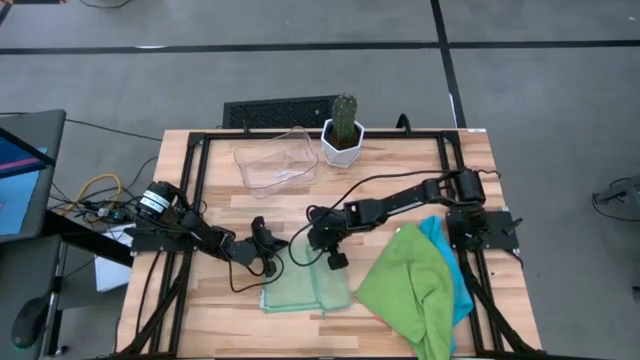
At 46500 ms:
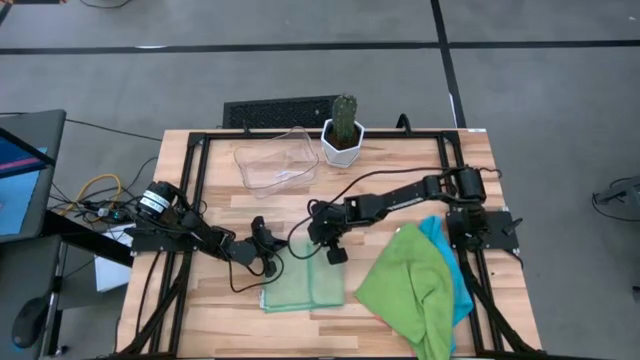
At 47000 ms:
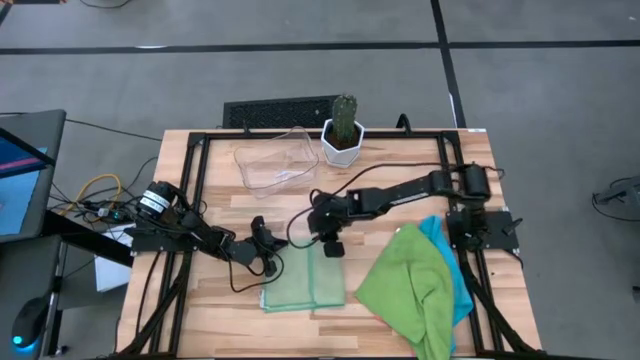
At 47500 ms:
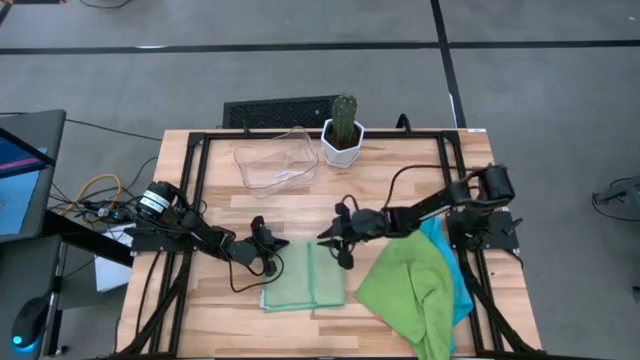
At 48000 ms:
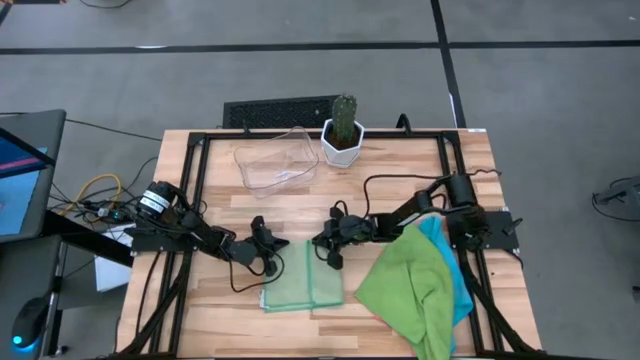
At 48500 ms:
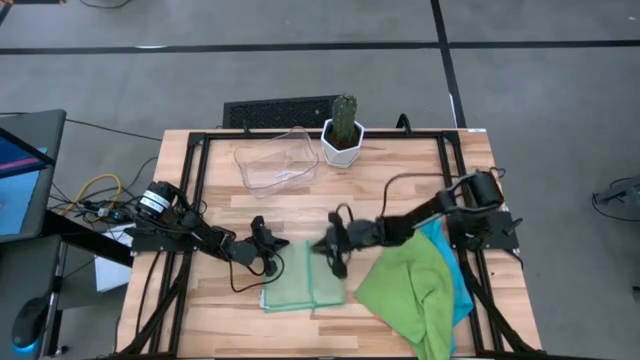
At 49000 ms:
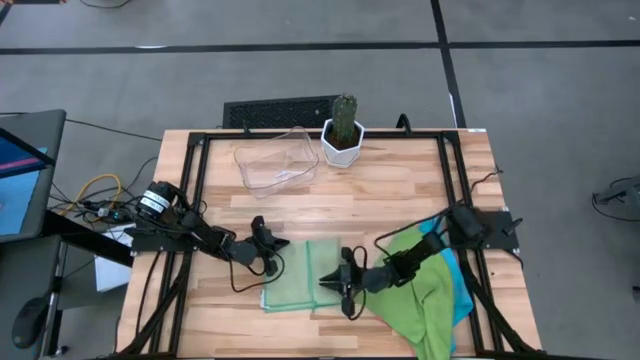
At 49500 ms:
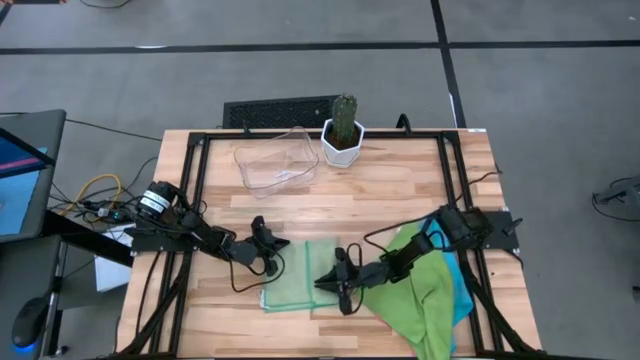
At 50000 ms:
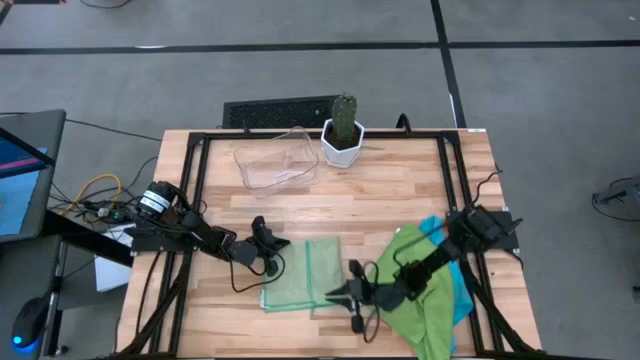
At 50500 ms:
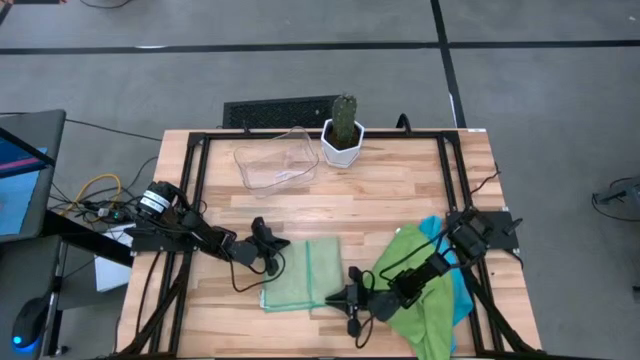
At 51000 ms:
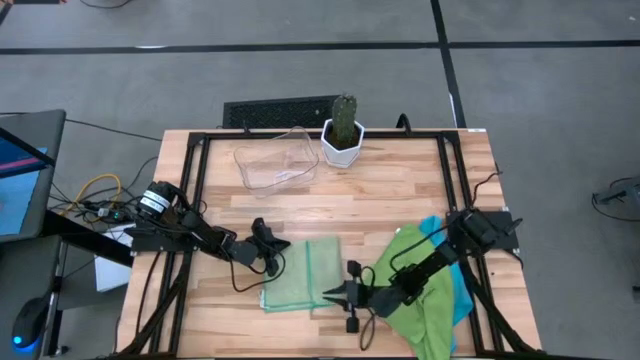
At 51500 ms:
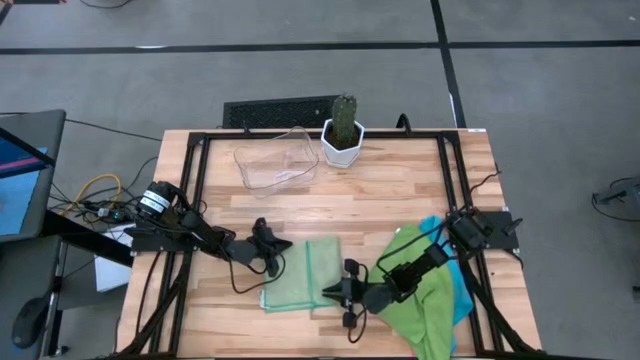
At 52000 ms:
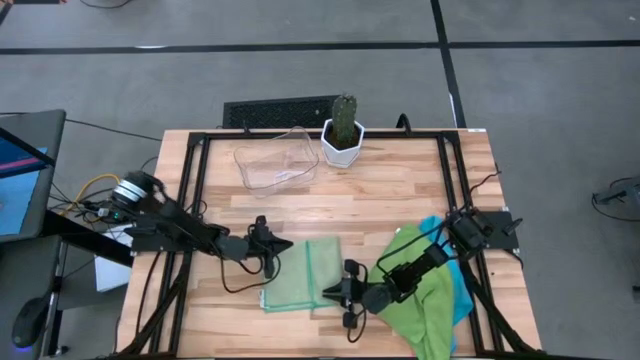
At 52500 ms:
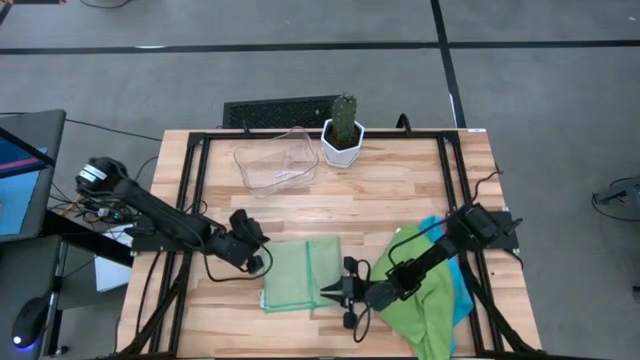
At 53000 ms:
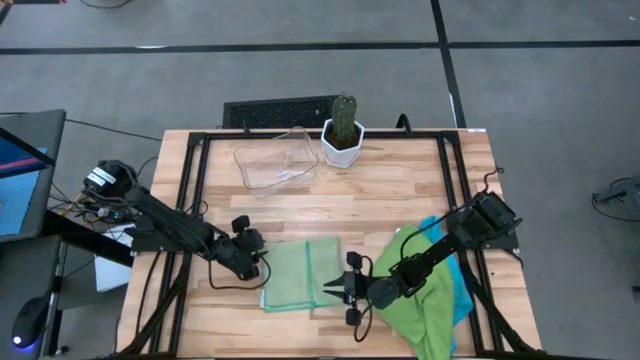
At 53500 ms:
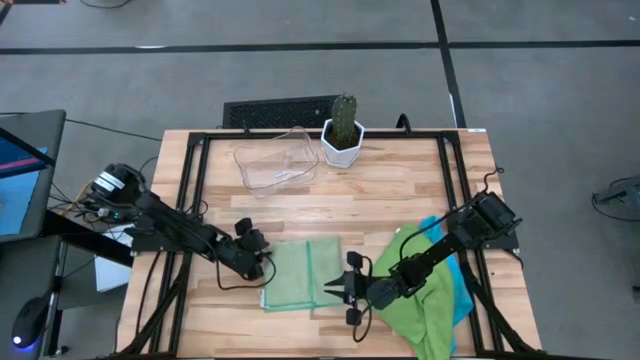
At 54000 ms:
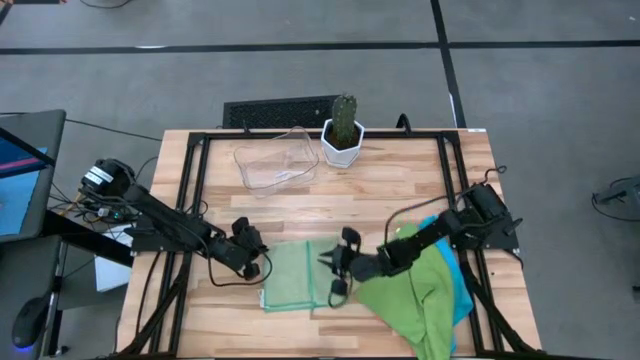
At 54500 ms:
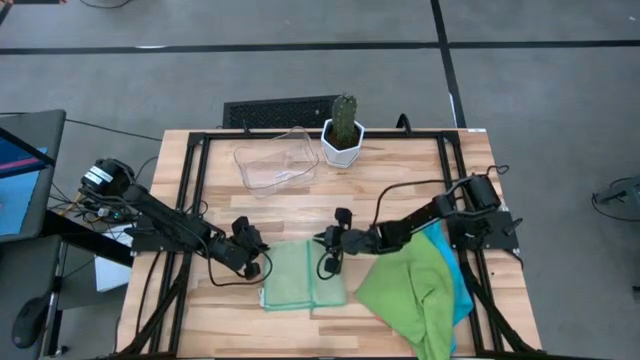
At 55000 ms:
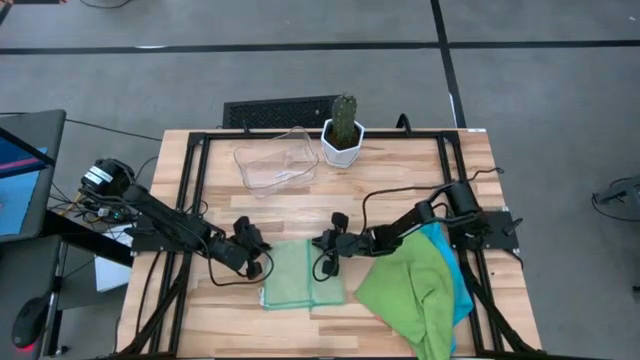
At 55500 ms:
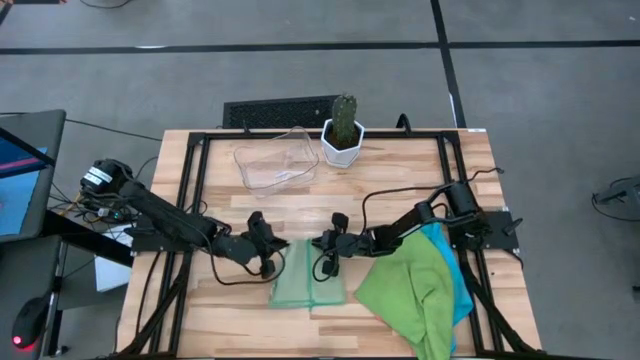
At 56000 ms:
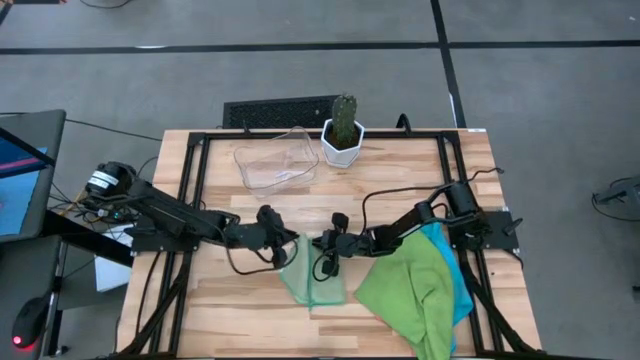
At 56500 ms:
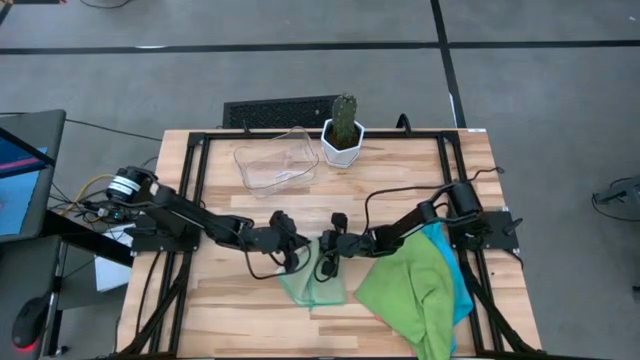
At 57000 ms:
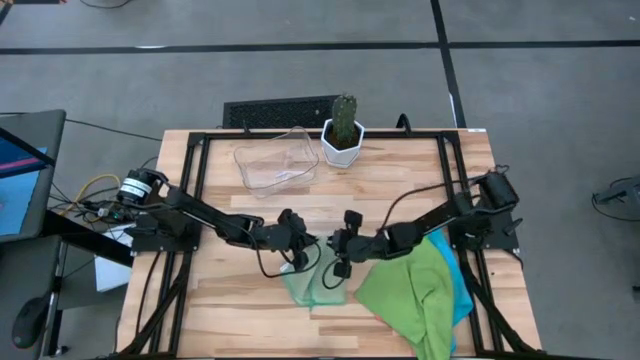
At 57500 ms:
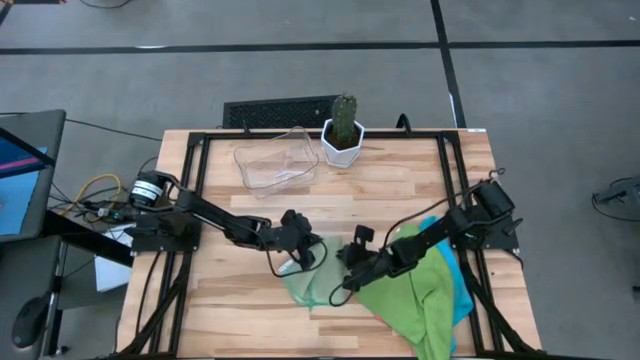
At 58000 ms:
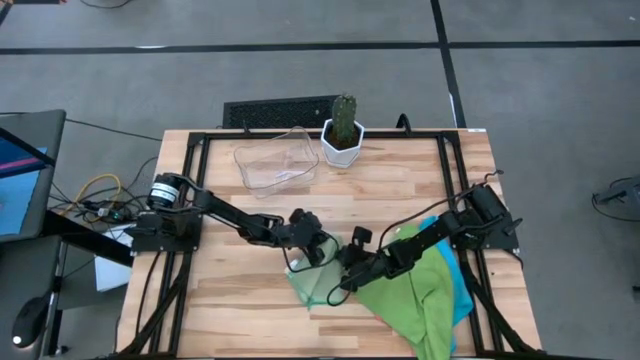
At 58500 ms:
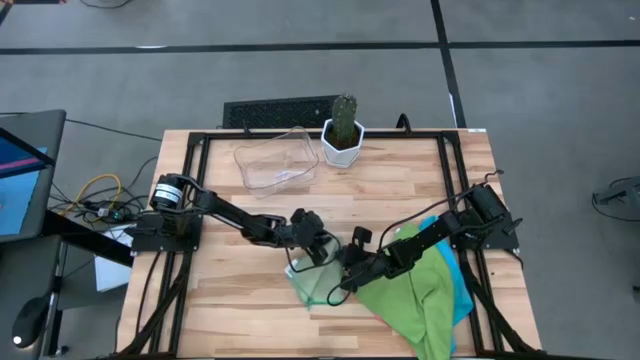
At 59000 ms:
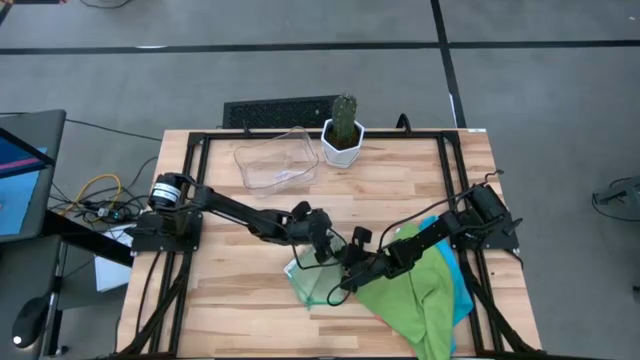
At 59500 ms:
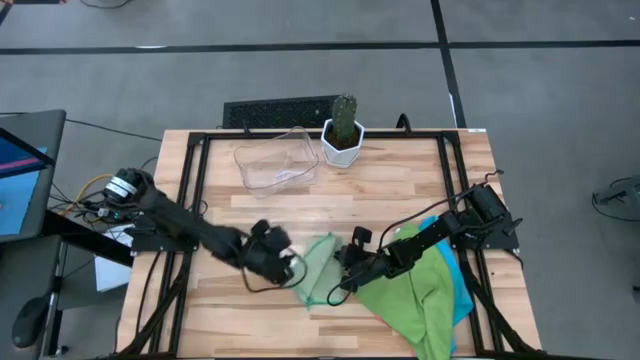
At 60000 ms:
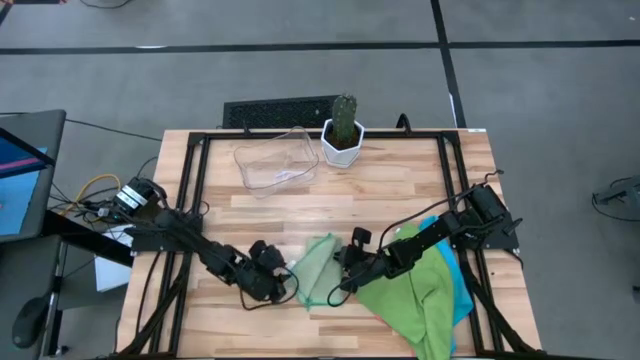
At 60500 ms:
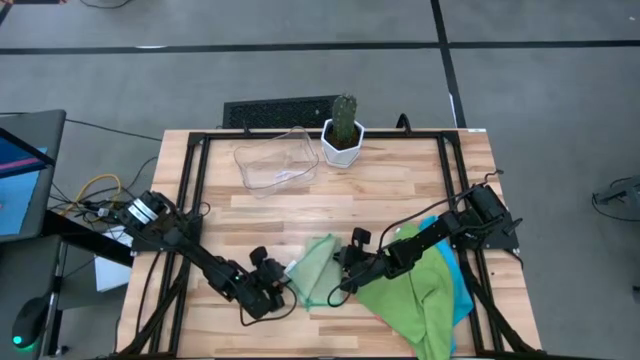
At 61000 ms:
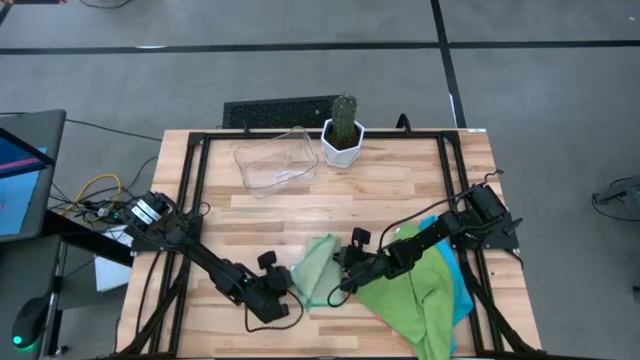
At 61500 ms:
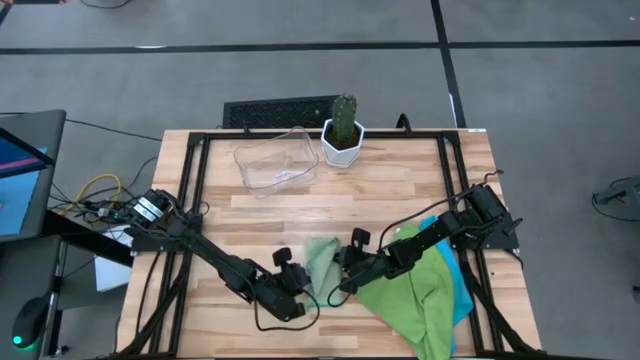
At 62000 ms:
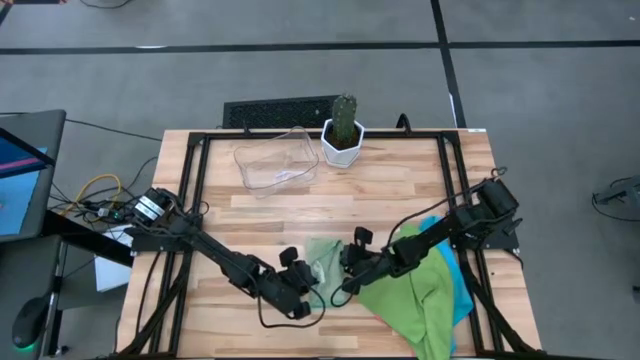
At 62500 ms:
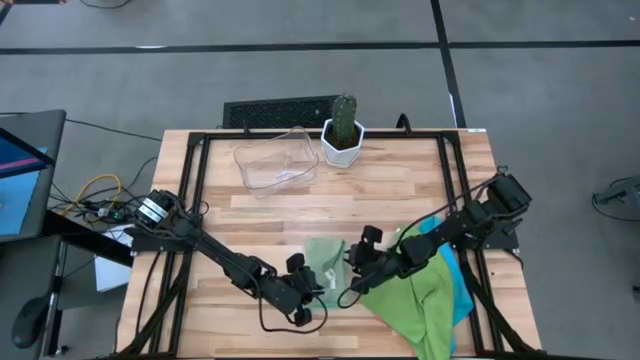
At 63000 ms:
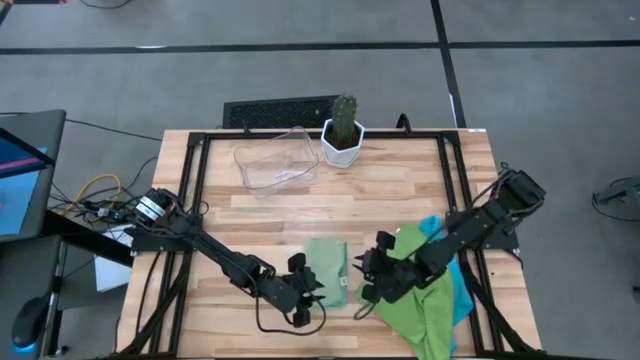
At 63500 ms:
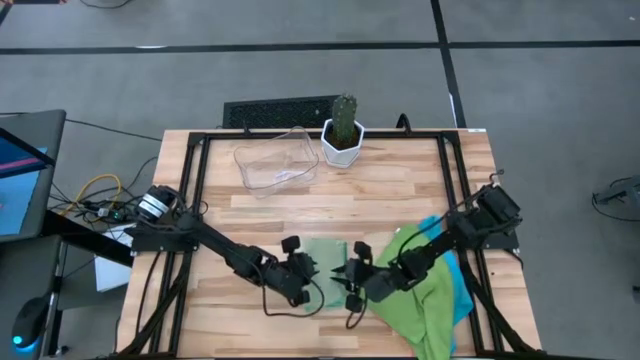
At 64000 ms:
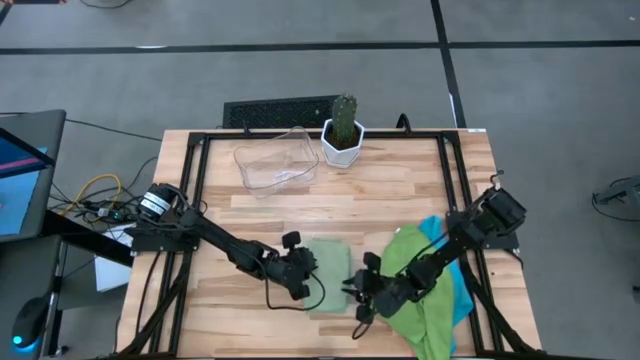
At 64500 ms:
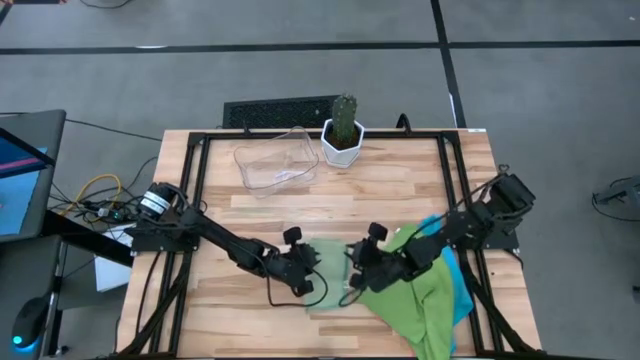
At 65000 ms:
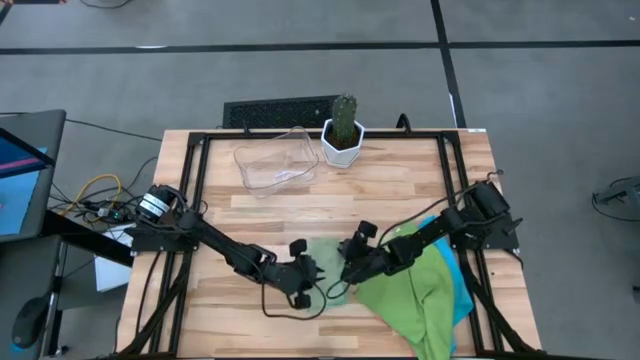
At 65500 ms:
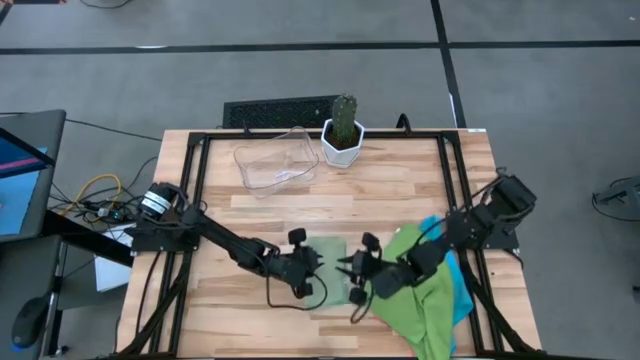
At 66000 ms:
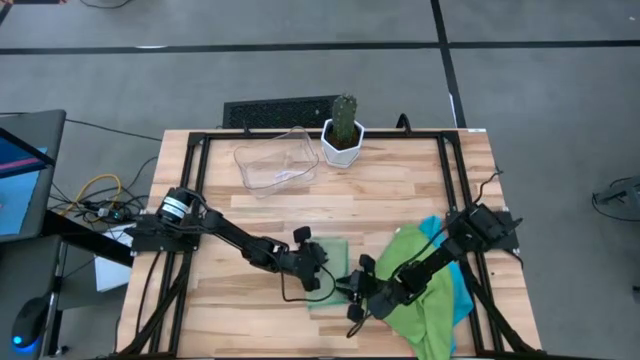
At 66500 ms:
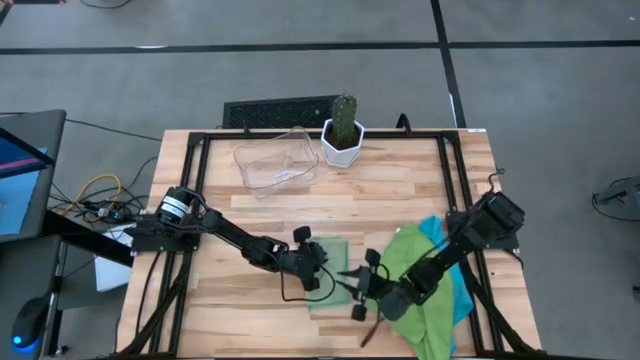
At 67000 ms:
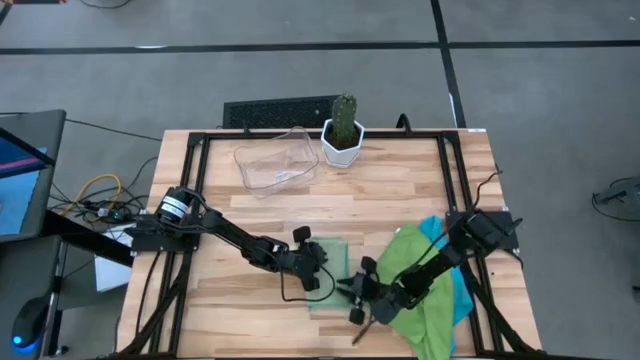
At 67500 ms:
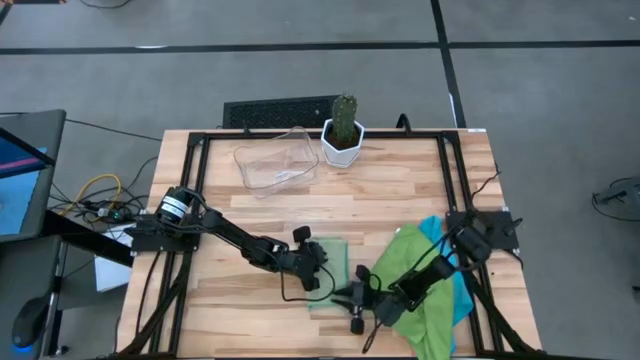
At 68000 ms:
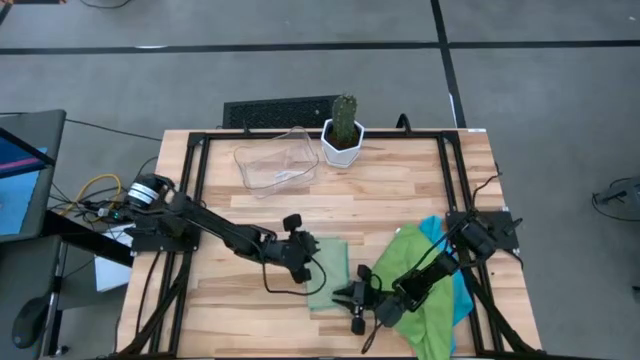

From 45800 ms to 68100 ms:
Task: Fold microfiber towels
Fold the light green microfiber towel
